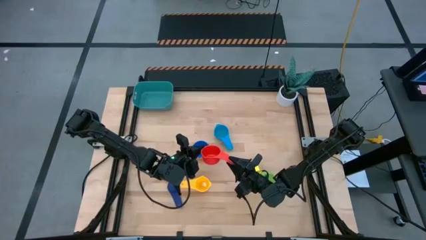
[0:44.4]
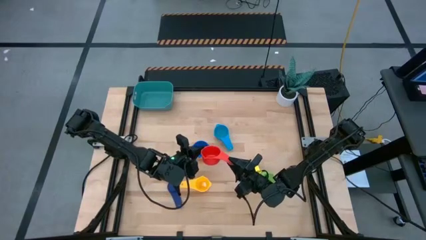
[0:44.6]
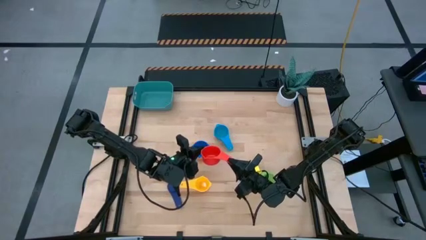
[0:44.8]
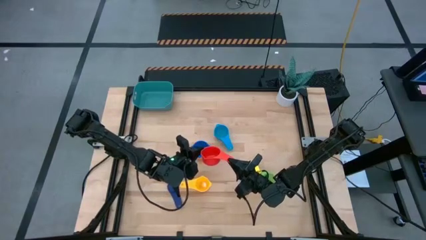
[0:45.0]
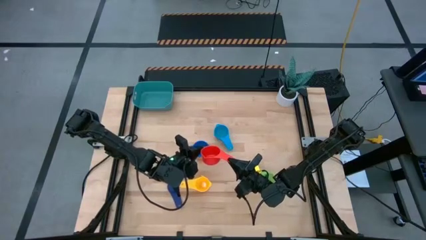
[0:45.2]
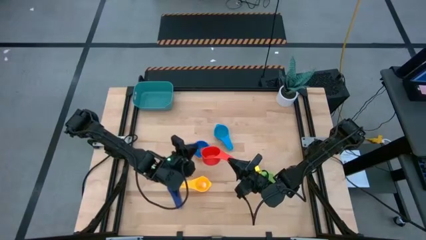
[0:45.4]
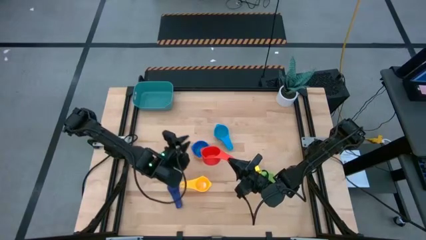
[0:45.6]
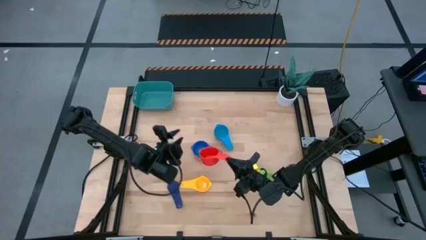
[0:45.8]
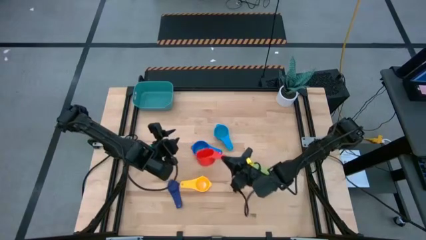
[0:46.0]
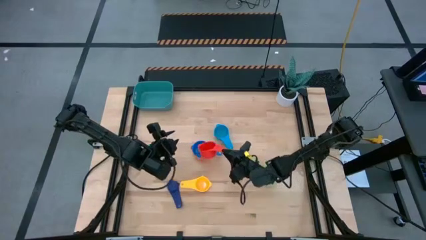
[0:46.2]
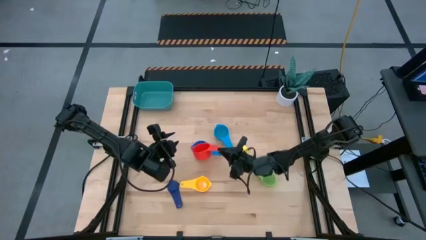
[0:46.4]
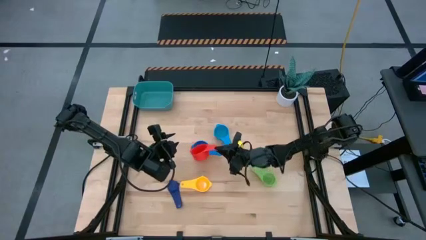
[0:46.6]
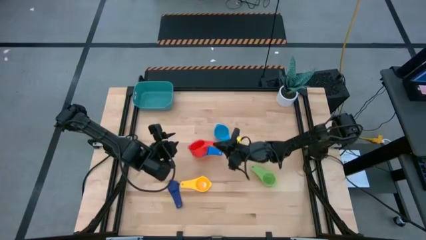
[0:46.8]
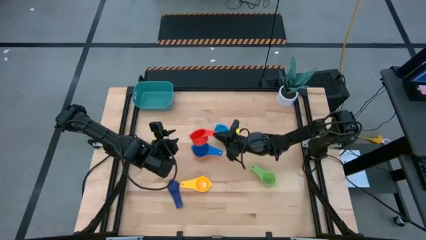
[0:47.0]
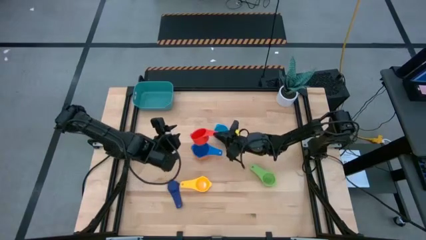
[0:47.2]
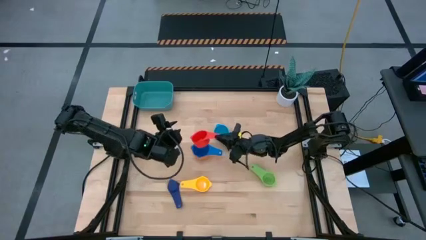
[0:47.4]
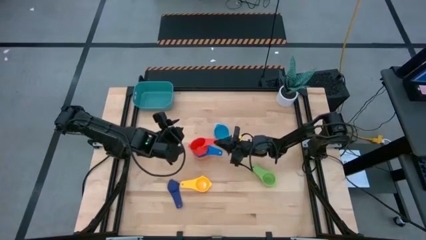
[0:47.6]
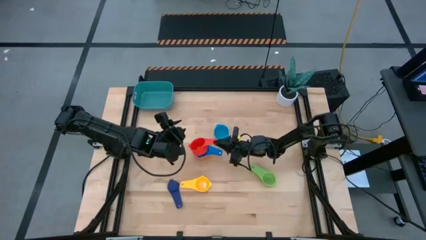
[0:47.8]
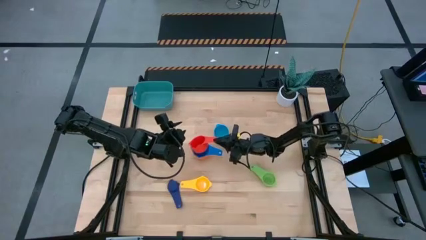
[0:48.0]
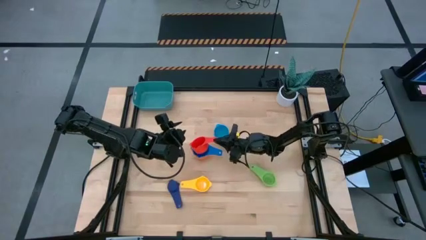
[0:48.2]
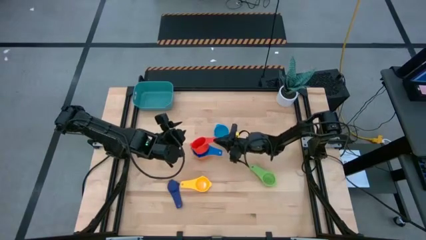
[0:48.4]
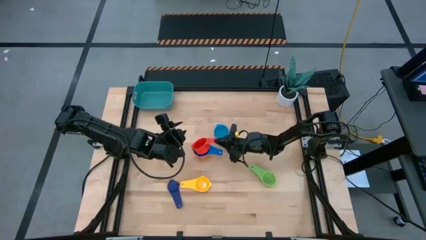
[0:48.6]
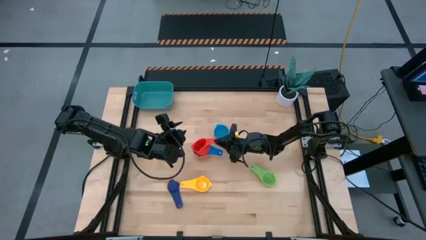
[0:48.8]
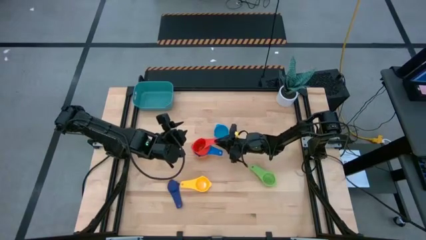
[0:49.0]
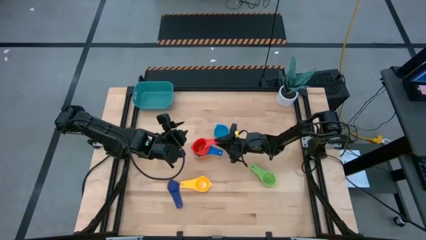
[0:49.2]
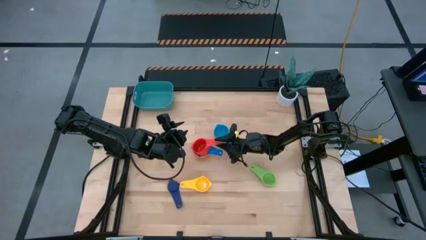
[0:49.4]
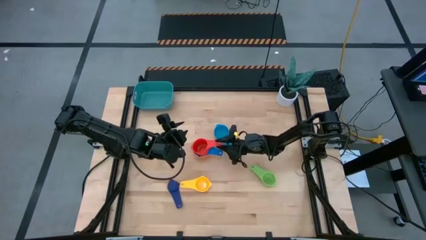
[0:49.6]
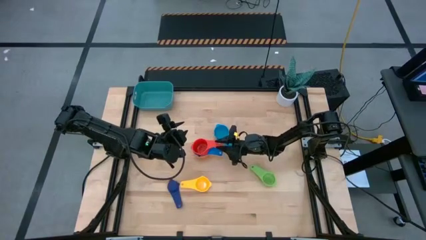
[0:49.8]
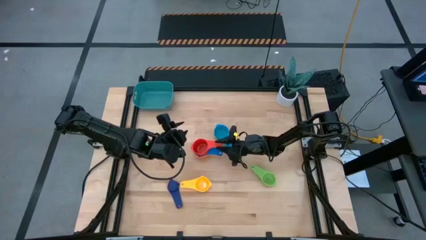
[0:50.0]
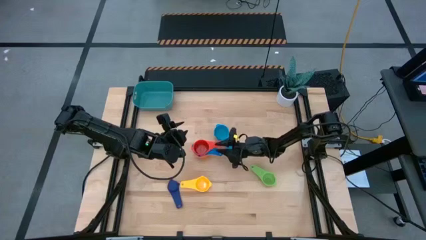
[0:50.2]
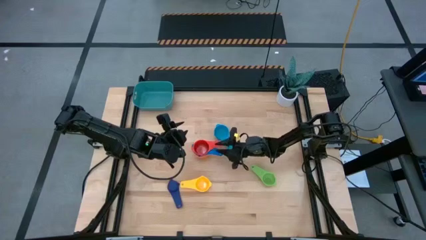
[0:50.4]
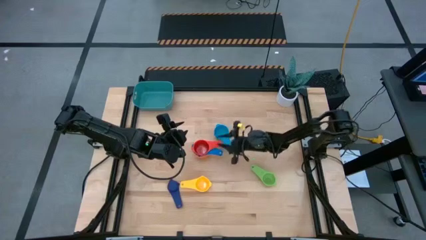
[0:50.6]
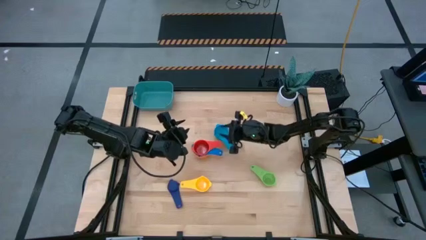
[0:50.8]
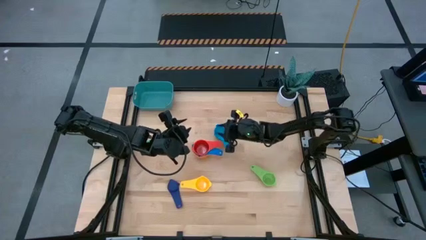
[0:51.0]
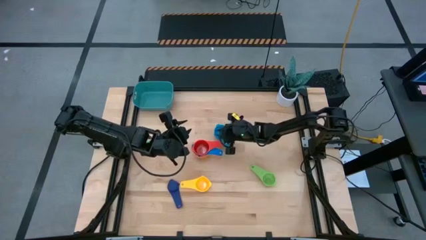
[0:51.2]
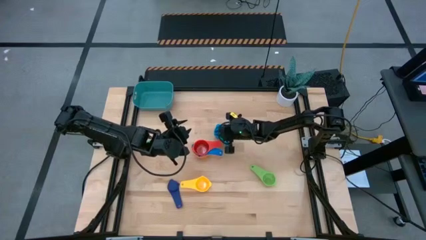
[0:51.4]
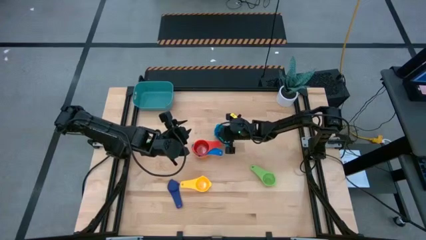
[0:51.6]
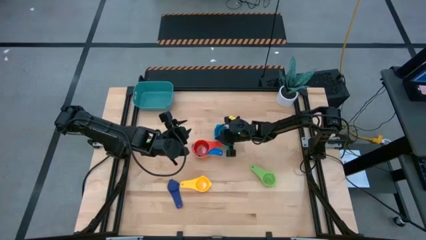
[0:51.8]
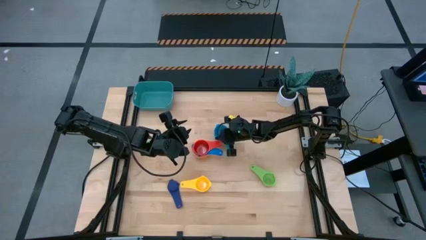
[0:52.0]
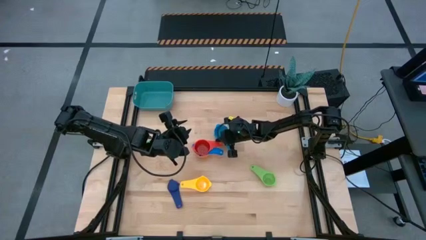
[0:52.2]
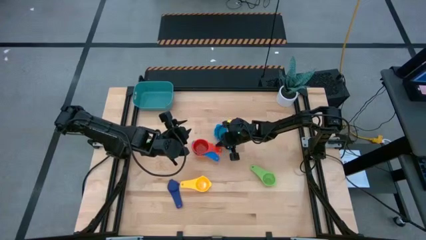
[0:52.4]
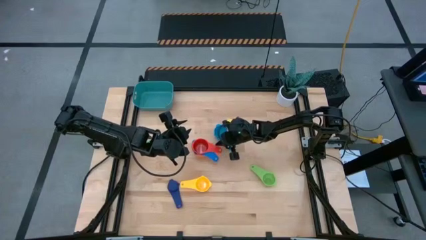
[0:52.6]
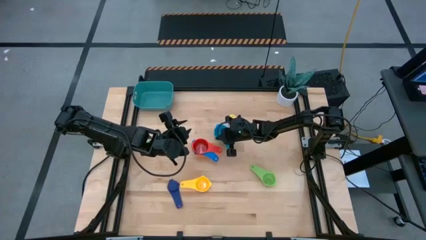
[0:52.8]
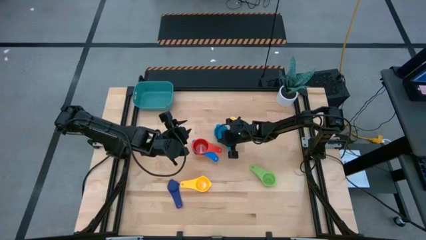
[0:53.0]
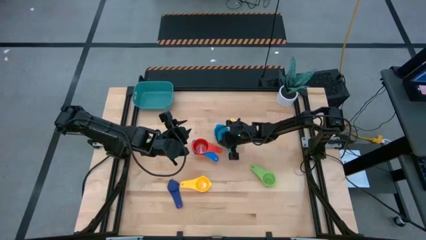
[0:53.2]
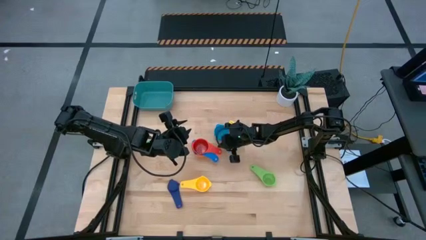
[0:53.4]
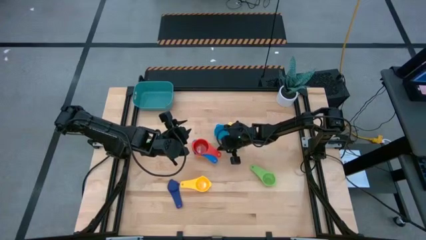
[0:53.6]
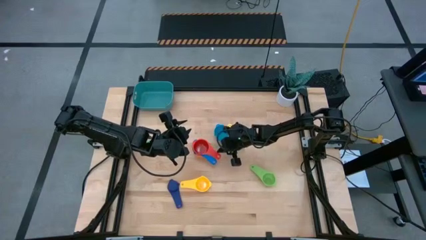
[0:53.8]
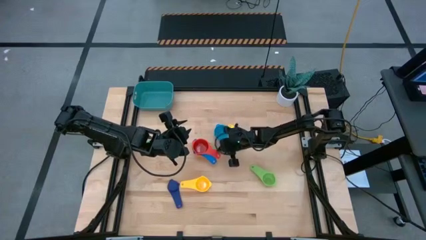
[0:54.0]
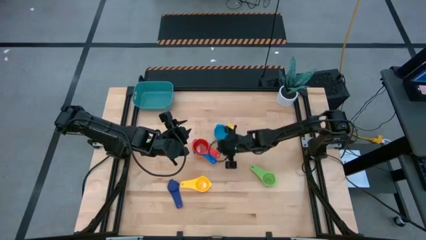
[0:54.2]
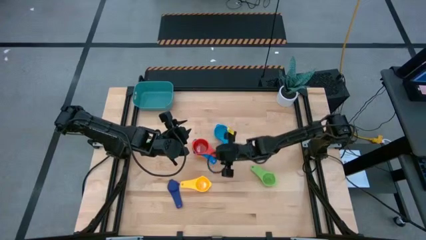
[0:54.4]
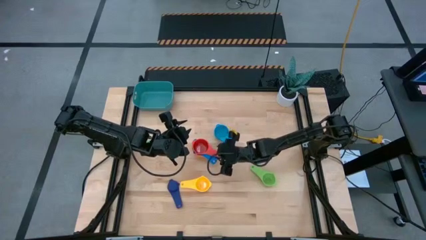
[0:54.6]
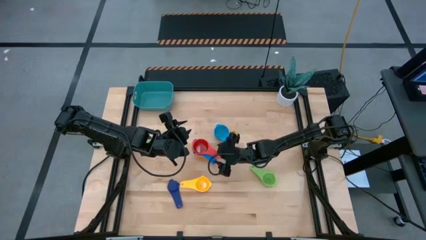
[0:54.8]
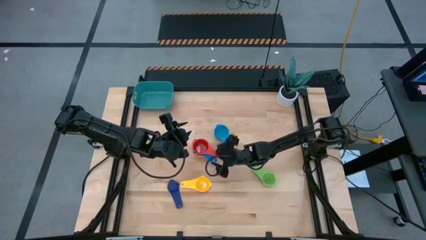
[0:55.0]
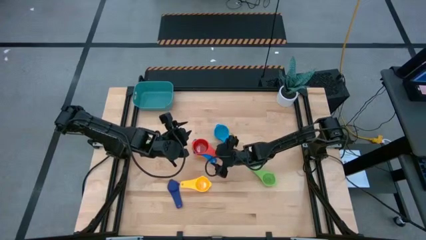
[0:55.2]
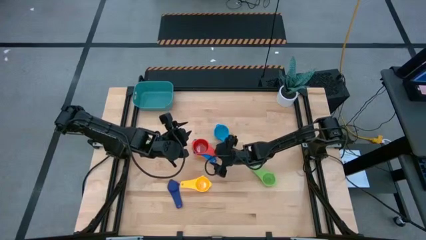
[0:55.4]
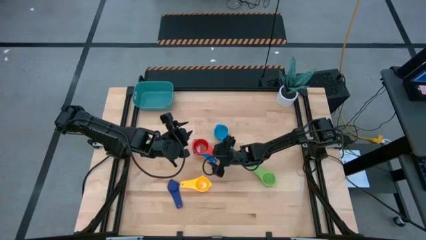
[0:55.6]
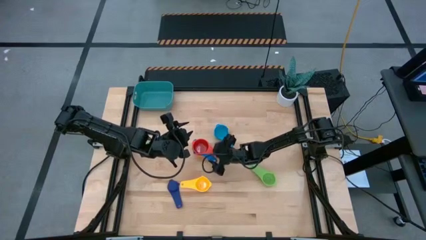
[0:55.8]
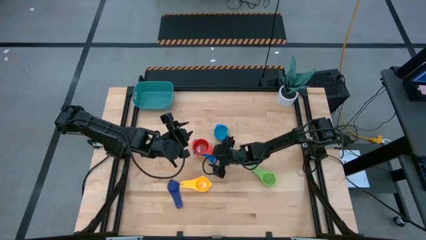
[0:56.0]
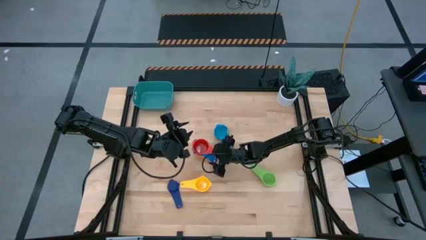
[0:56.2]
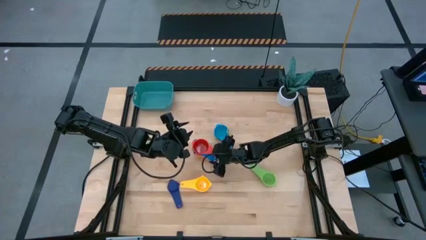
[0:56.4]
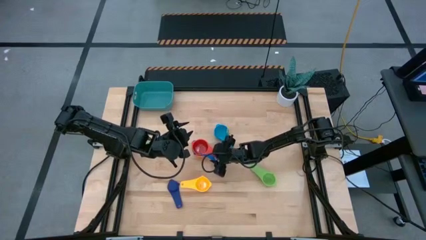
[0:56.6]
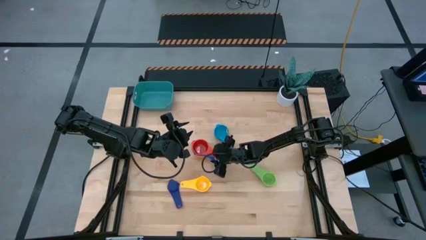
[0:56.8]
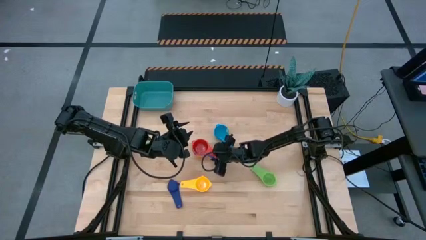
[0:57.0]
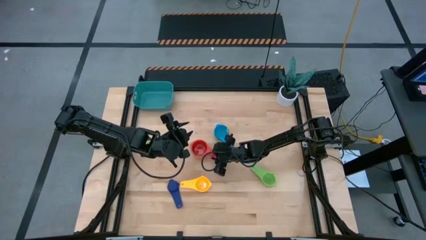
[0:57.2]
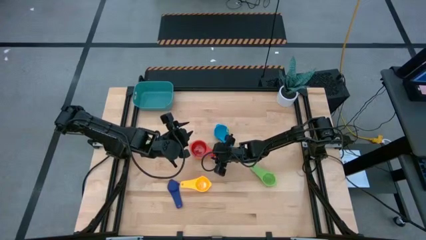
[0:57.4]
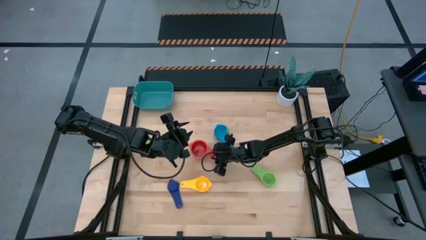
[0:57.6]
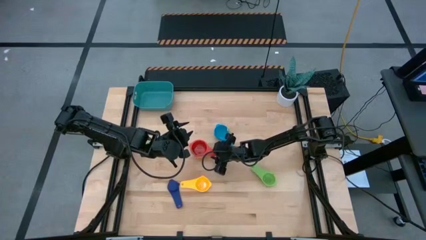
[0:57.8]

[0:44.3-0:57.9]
Task: Nest measuring cups in basket
Stack the red measuring cup on top of the blue measuring cup

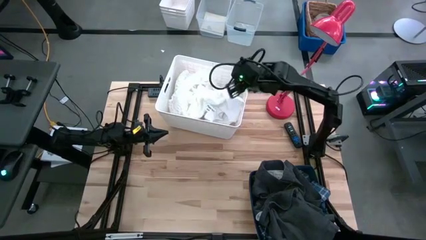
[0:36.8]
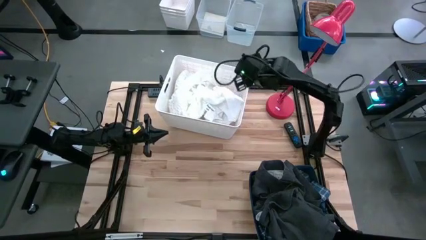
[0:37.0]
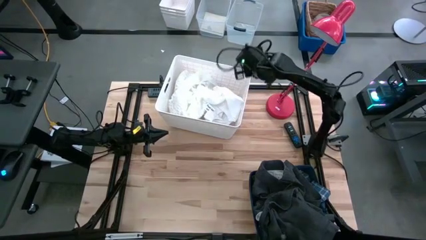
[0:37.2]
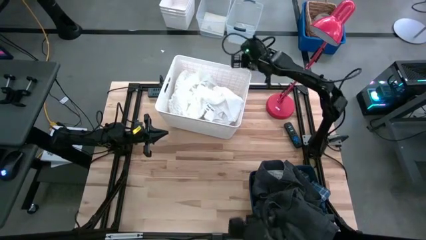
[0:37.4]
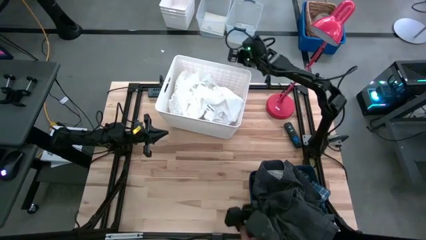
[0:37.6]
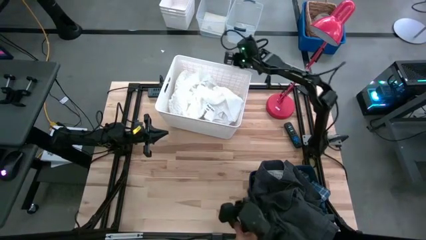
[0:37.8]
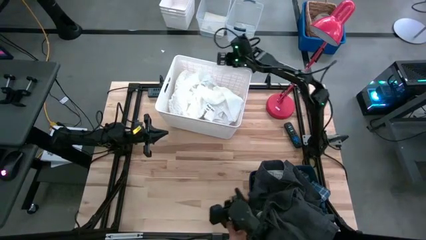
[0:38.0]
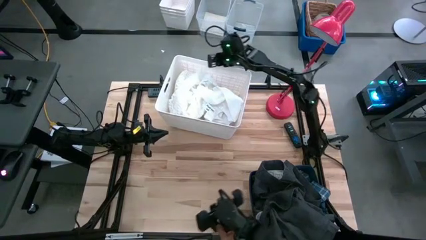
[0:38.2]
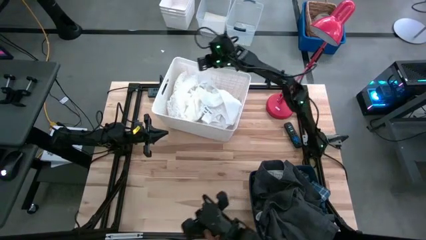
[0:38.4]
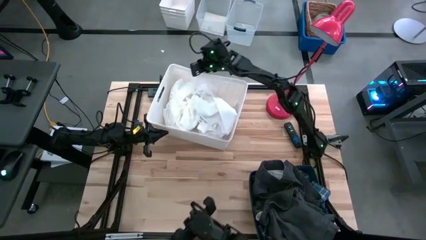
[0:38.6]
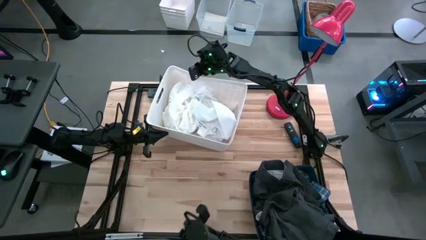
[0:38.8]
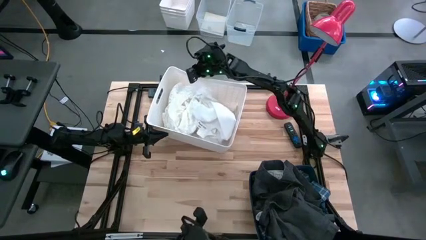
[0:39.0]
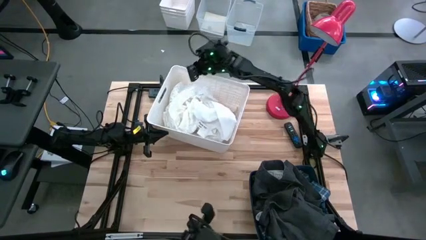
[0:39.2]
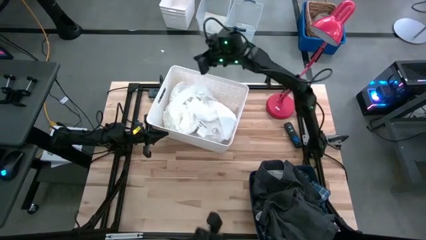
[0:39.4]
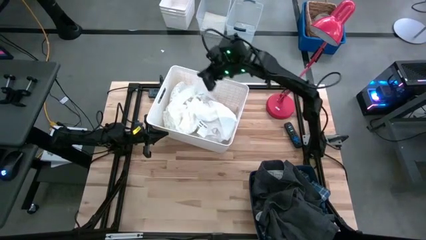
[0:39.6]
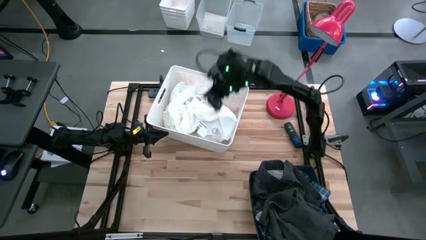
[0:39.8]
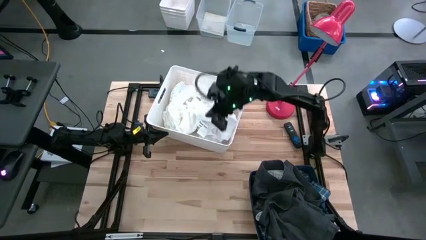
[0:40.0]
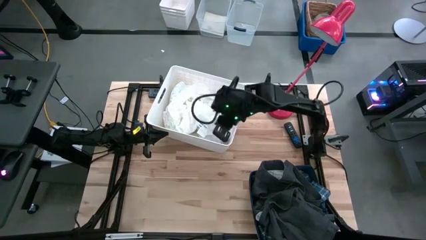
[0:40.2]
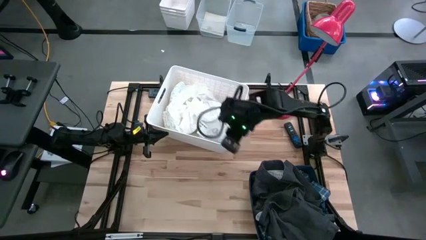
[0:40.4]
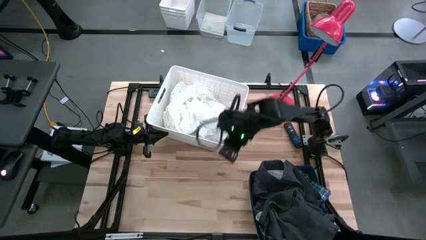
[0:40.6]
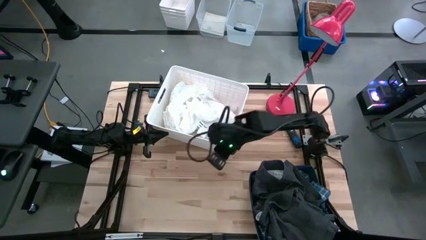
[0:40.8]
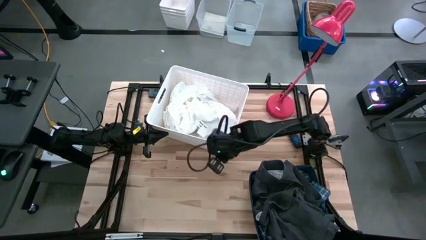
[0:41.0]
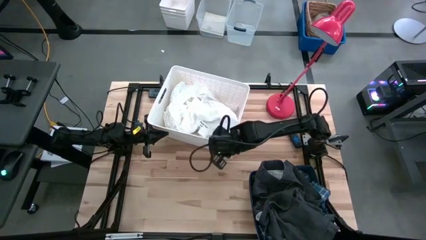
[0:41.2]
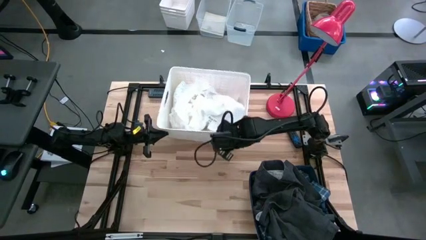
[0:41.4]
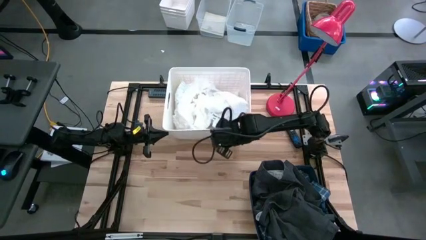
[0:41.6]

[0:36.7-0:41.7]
Task: Sort clothes
Adjust the white laundry bin
